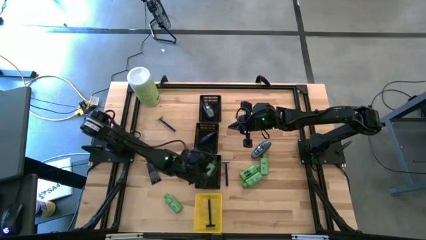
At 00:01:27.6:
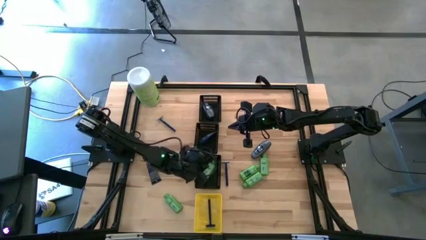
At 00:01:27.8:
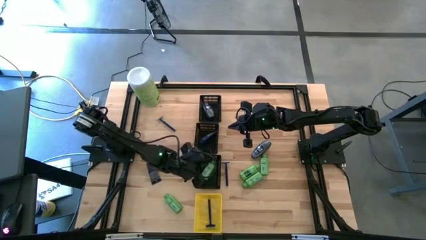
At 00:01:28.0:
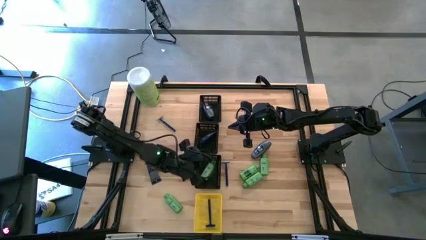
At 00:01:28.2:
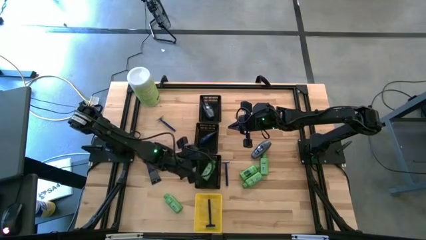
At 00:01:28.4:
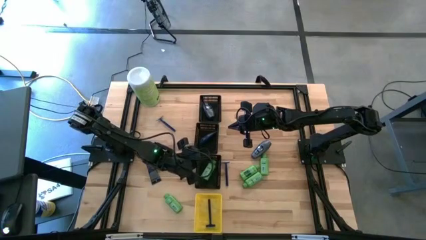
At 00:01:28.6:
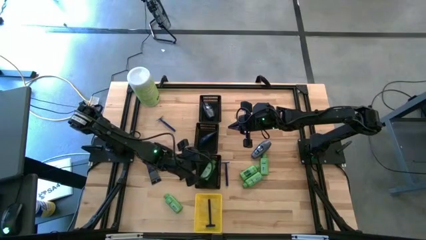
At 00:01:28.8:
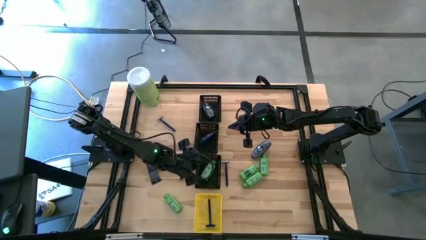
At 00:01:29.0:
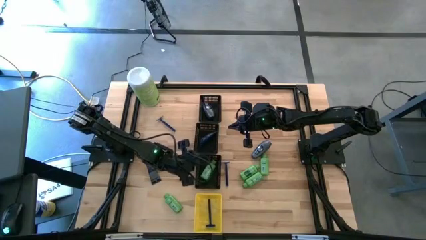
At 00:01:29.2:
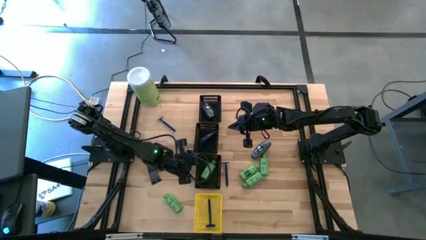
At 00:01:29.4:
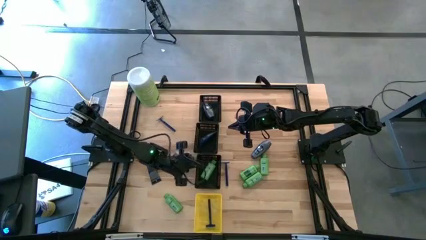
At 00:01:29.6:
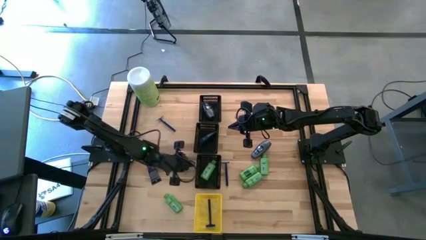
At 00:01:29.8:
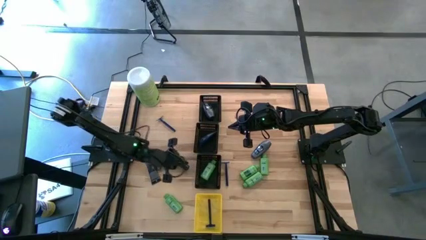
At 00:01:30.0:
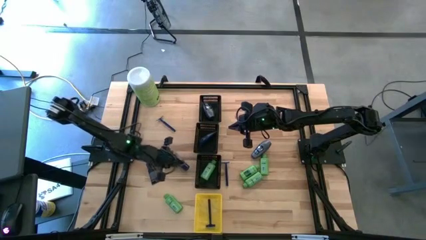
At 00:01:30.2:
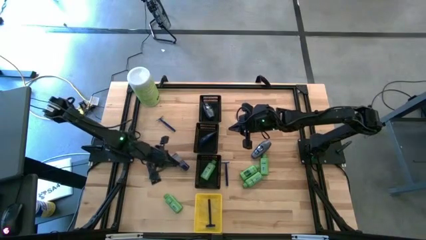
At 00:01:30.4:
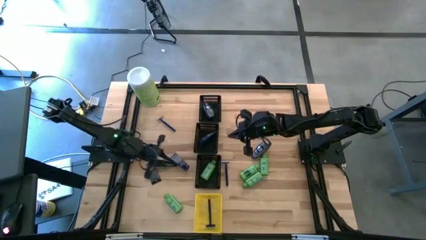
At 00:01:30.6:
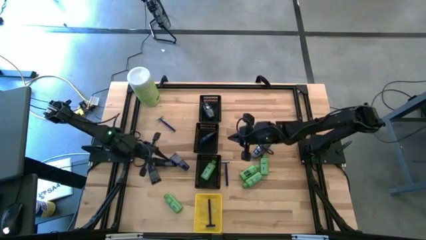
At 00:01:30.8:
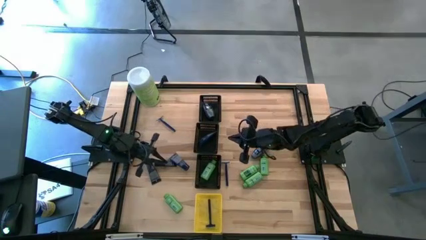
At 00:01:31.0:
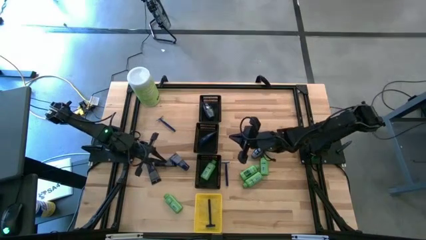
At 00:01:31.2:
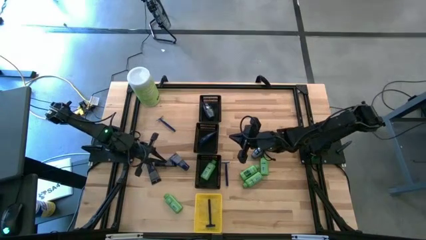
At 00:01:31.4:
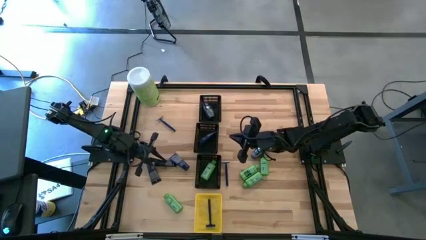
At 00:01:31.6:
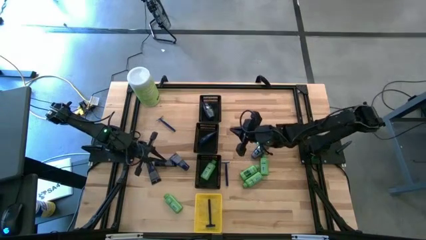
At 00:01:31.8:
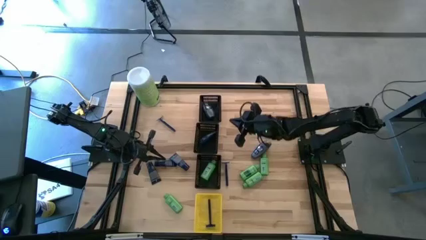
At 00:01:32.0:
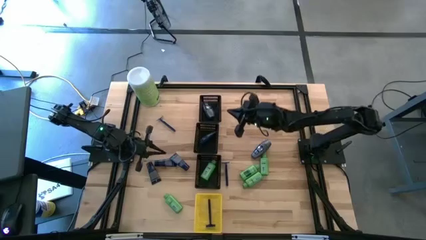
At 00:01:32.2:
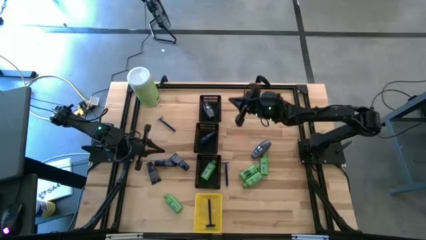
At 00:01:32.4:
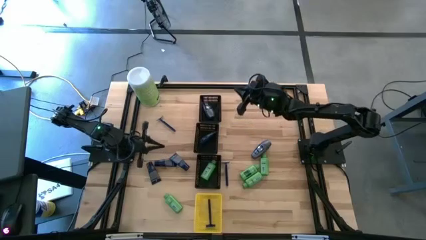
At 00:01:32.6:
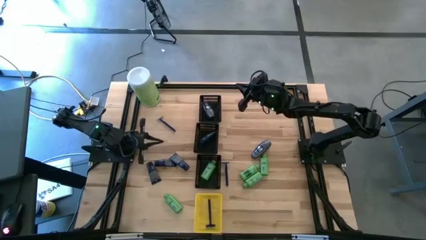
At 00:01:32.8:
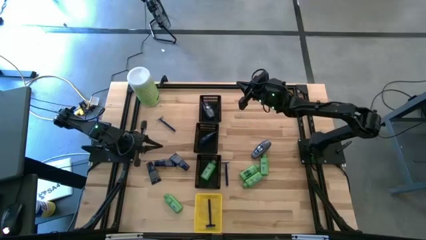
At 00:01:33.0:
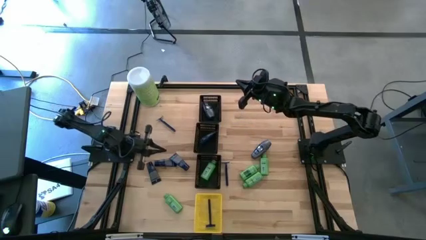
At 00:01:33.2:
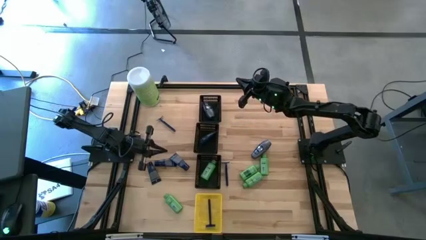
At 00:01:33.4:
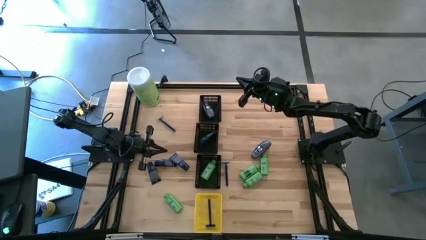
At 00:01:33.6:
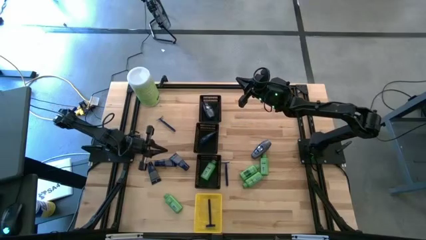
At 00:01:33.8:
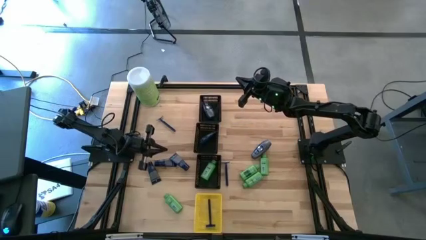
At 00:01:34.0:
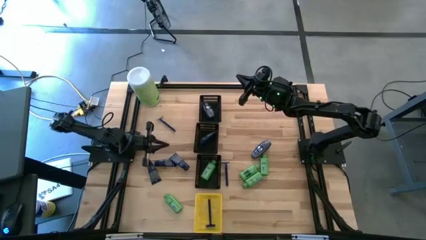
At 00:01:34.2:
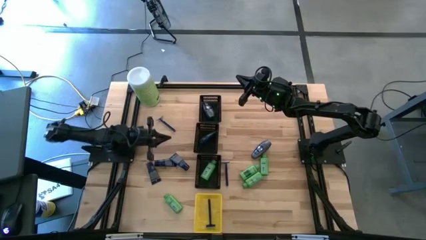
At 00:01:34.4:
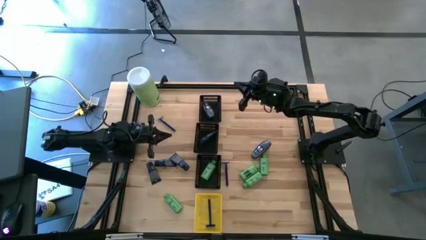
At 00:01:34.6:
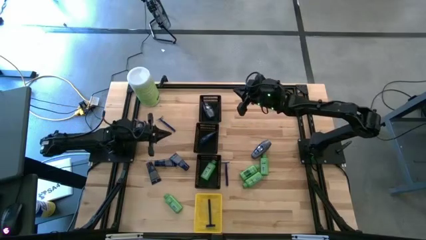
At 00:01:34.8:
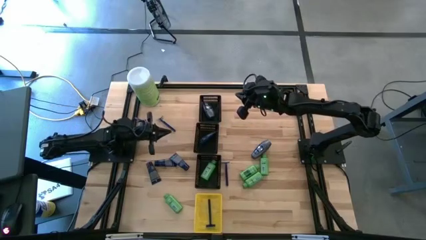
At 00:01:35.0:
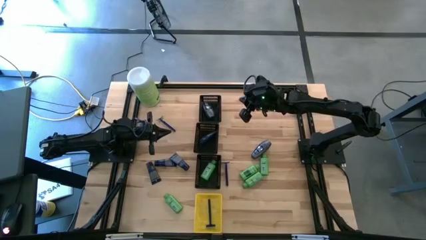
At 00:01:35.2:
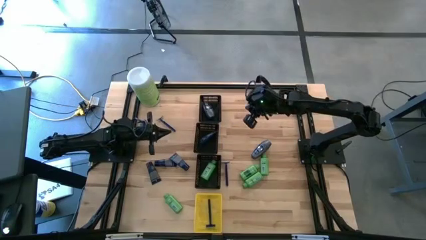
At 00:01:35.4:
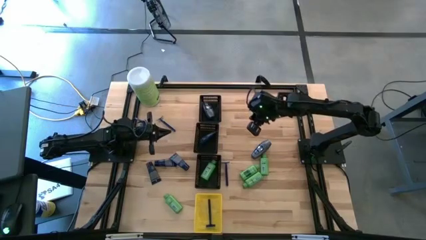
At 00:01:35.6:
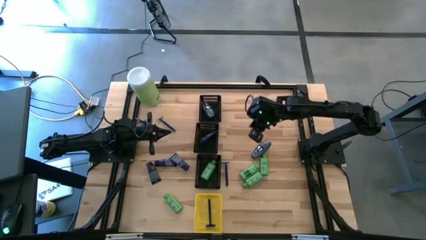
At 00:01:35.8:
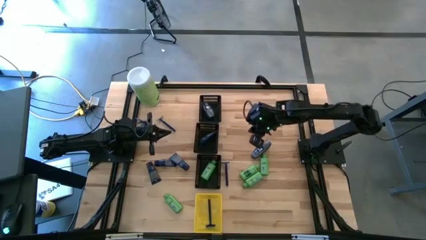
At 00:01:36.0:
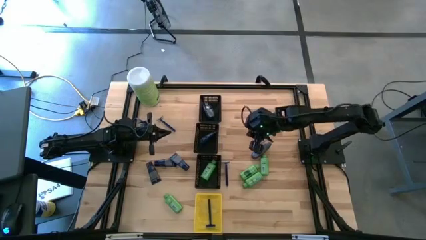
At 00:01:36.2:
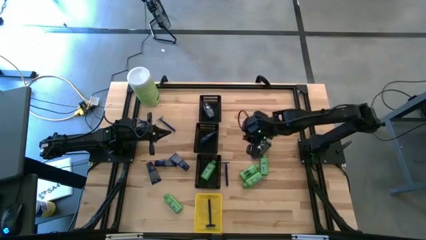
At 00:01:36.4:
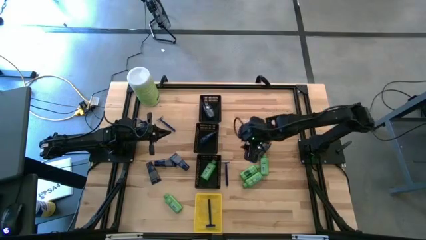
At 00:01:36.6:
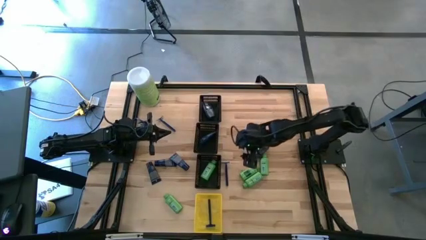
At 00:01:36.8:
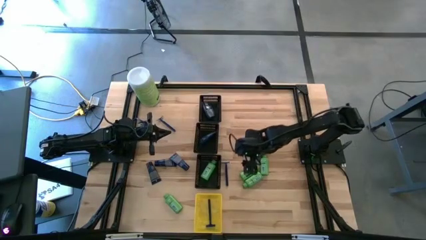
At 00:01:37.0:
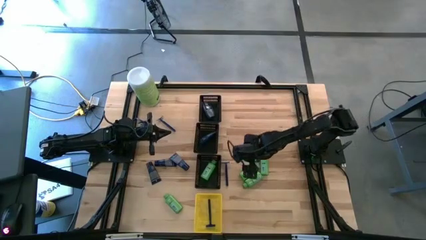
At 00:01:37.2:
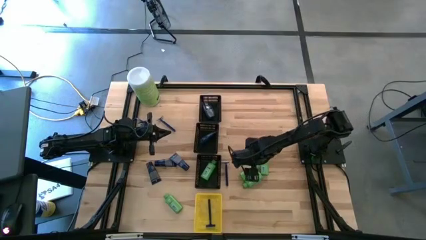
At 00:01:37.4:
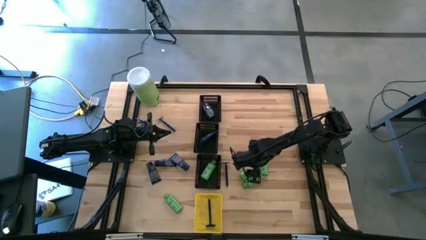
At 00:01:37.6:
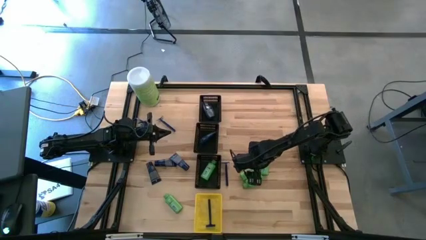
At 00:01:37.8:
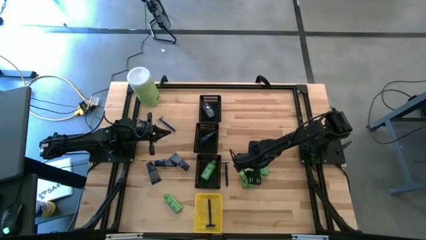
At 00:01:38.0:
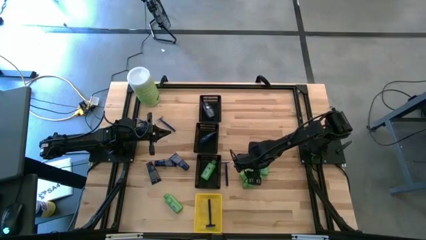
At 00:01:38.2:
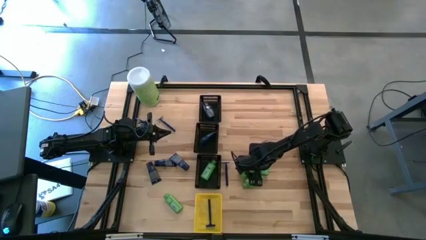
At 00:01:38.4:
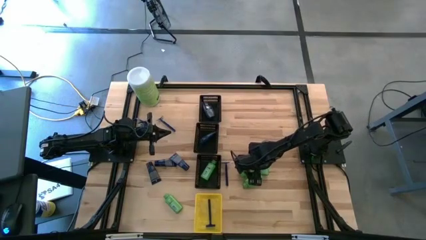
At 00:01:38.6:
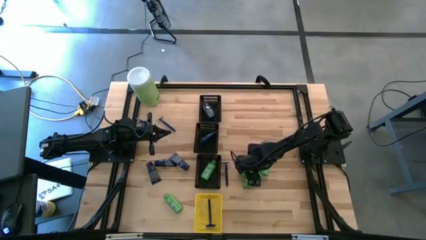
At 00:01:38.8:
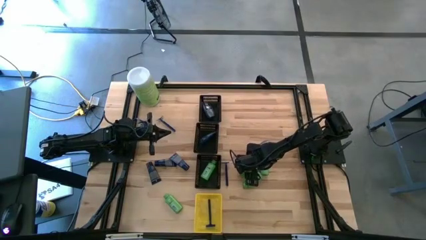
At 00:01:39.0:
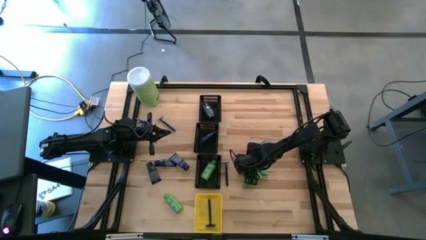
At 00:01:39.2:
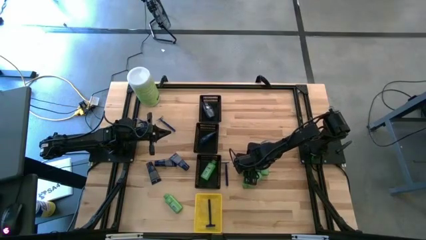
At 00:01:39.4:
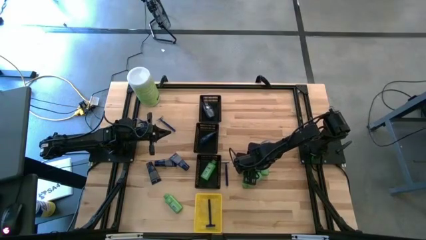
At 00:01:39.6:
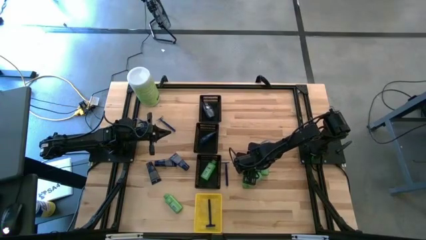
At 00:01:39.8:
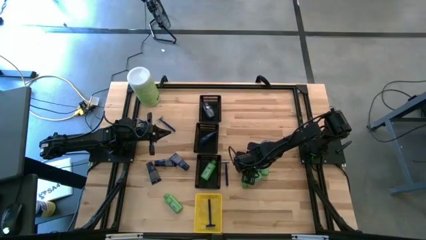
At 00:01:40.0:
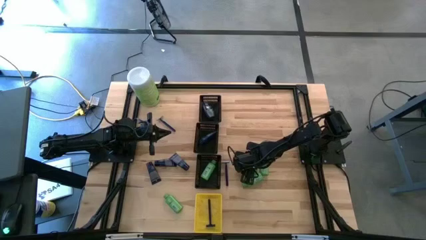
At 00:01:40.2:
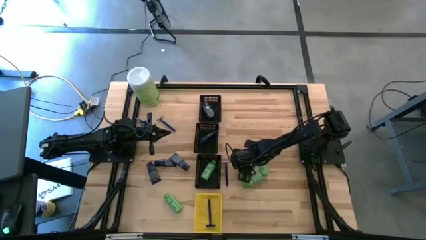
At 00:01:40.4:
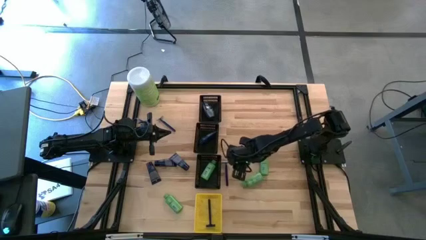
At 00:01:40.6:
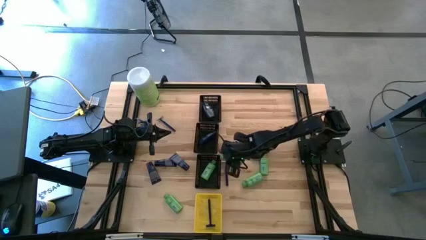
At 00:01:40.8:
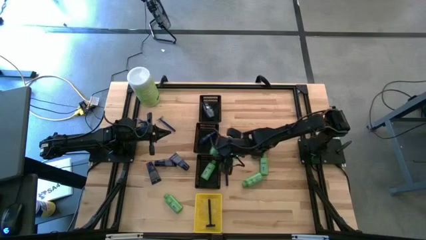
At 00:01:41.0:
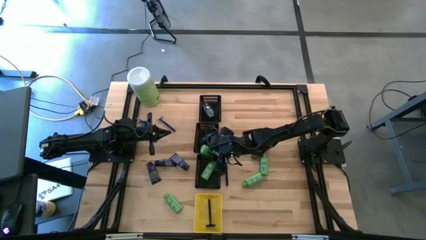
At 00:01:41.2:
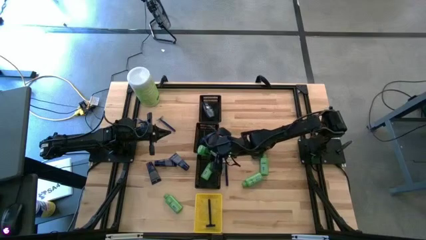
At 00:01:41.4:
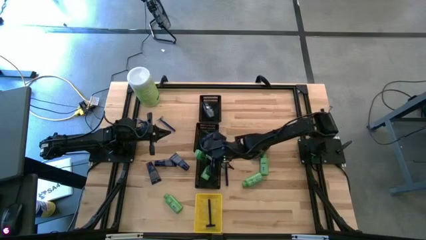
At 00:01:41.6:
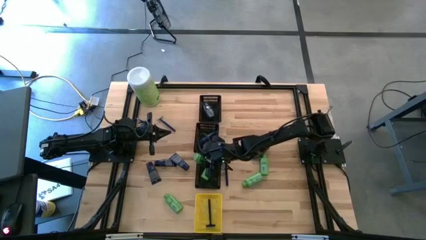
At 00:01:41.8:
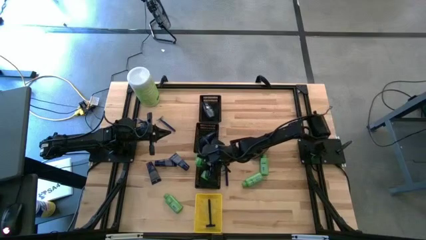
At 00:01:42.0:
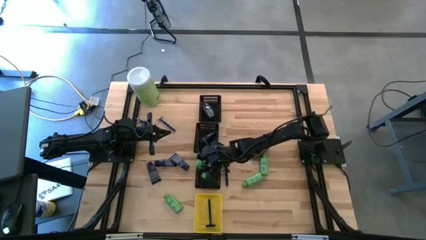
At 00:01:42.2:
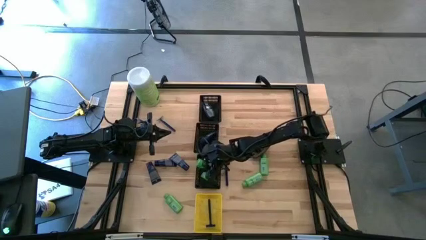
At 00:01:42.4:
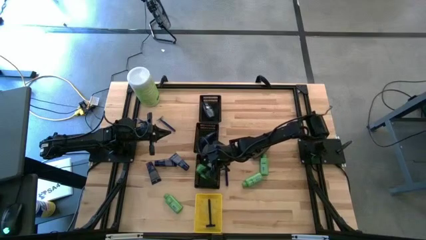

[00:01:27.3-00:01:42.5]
Task: Pick & Place Travel size toiletries
Put the green shampoo bottle into the bottom black bin
